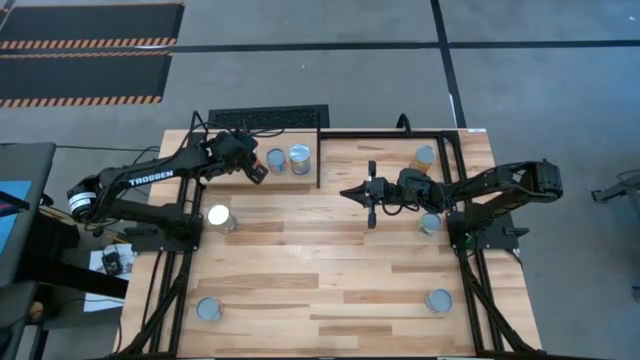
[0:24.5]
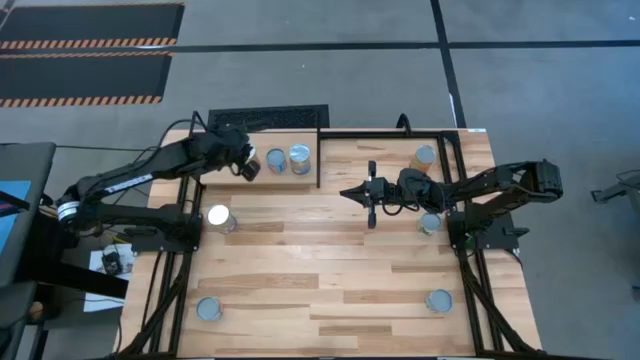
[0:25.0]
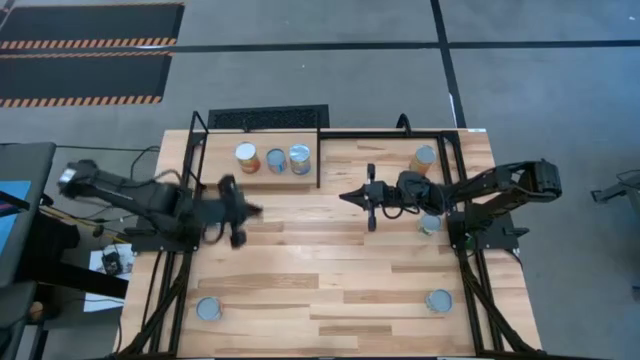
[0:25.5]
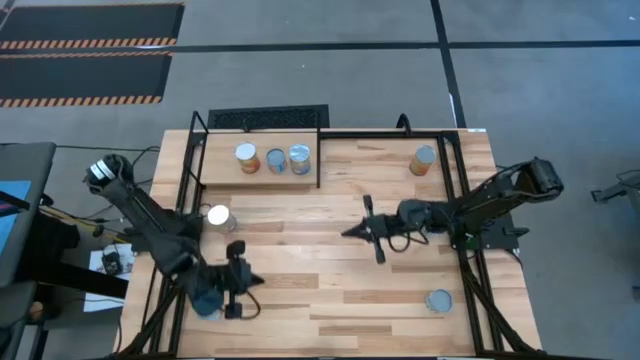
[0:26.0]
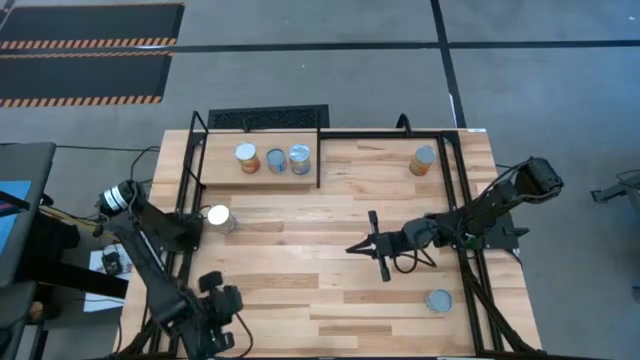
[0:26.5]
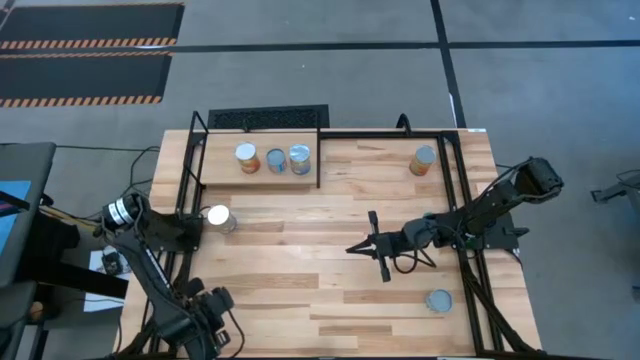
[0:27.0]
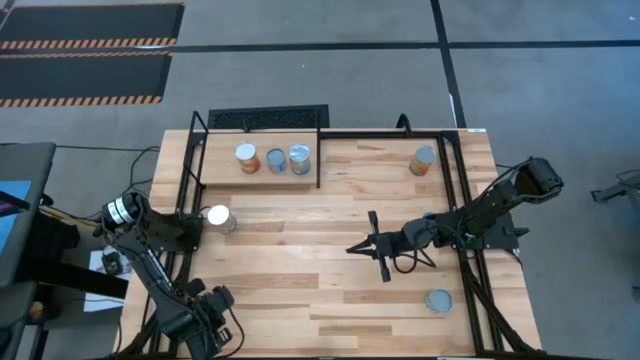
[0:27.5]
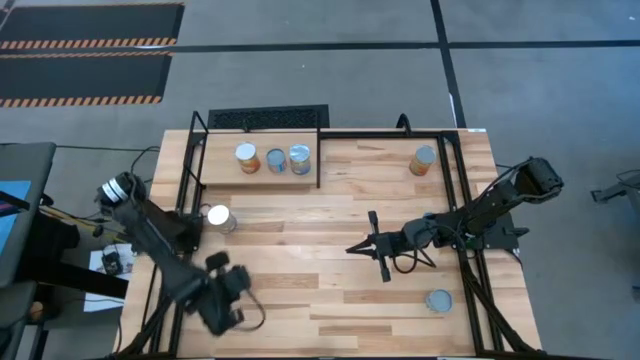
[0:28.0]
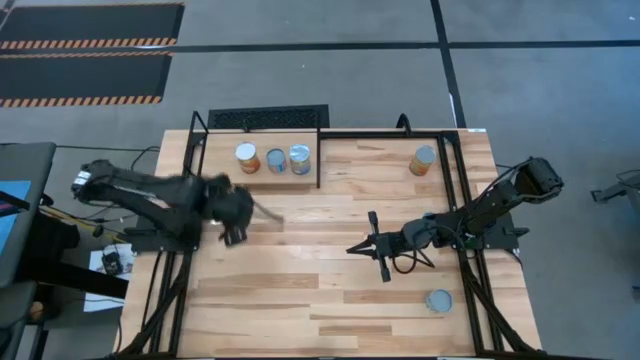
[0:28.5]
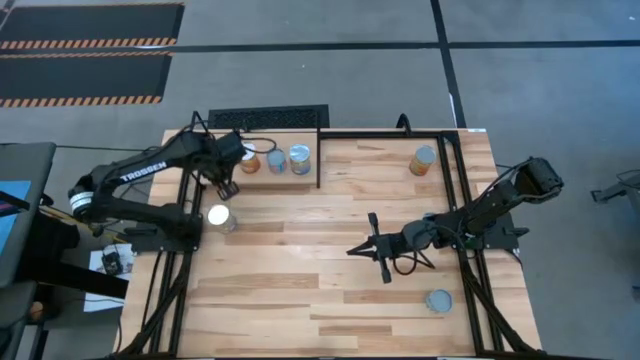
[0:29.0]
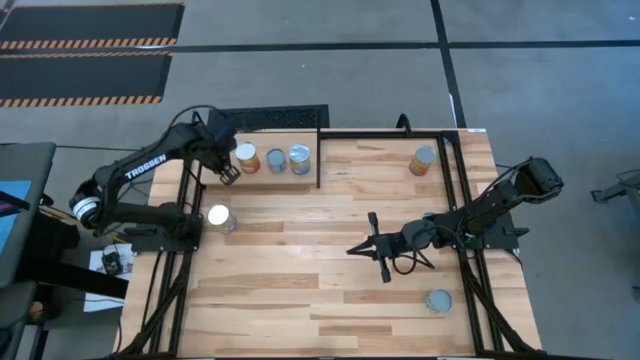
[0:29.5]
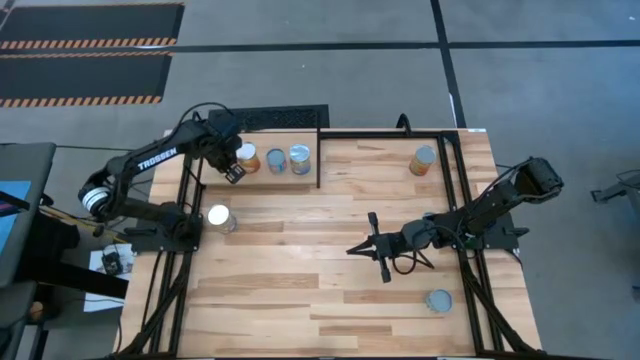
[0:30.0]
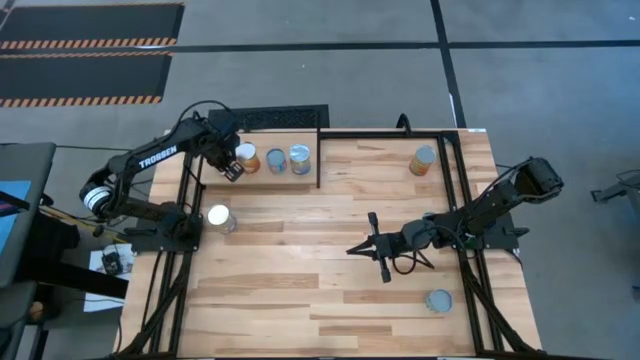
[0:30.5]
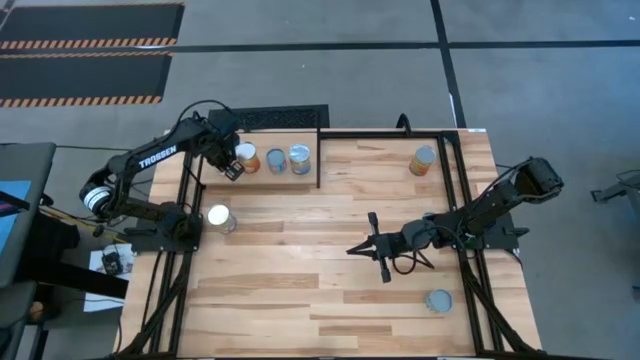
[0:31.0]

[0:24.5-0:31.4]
Task: Pick and place cans onto a shelf
Put the canned oranges on the shelf

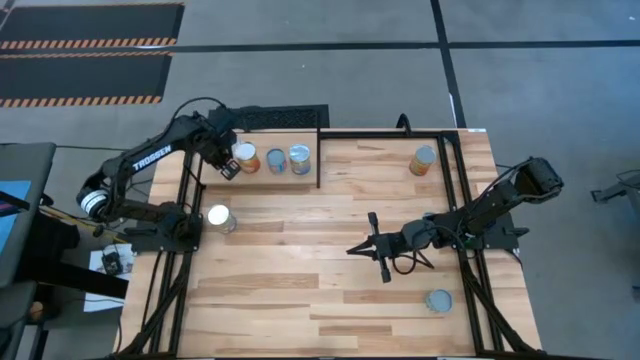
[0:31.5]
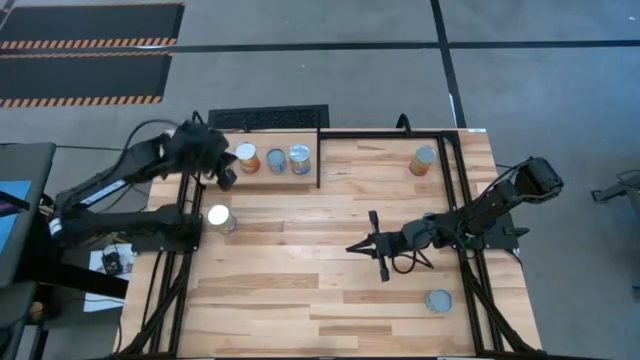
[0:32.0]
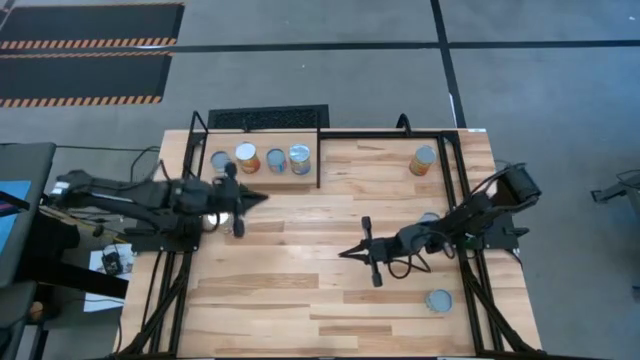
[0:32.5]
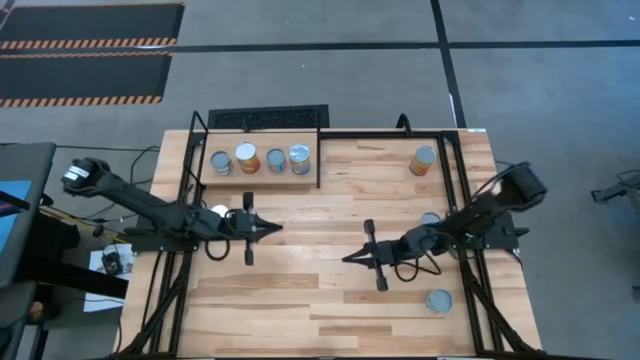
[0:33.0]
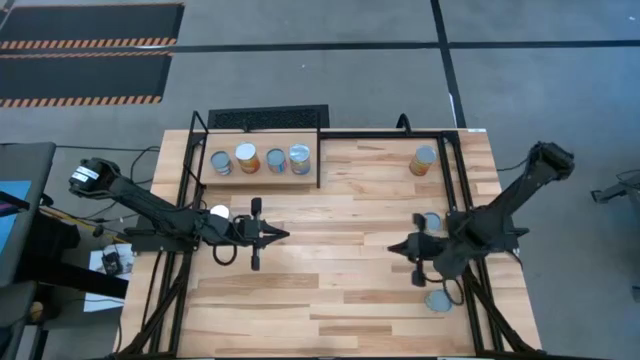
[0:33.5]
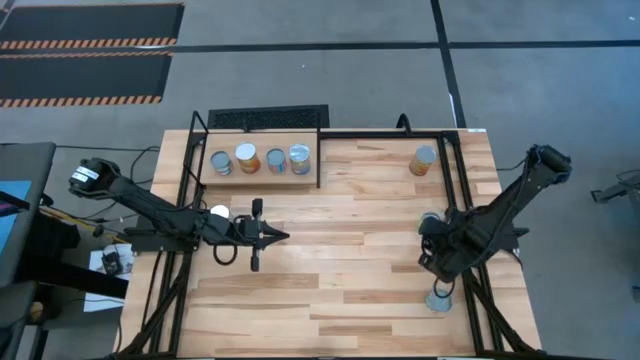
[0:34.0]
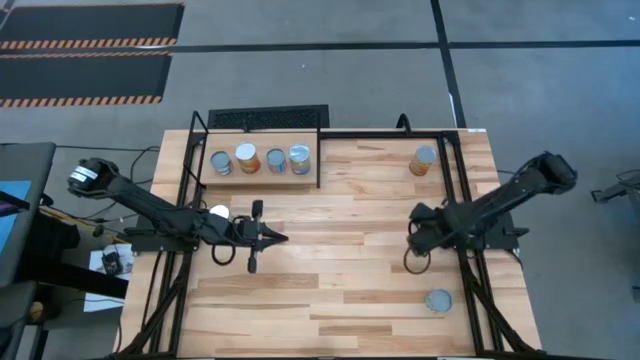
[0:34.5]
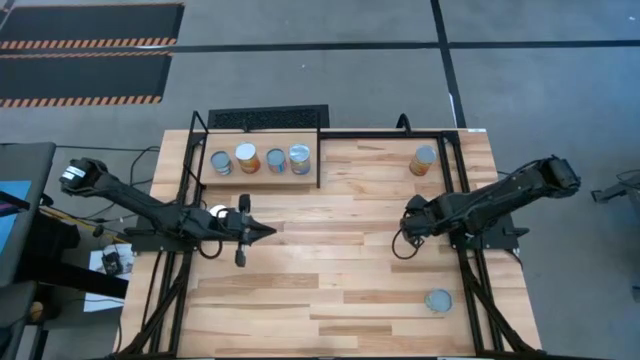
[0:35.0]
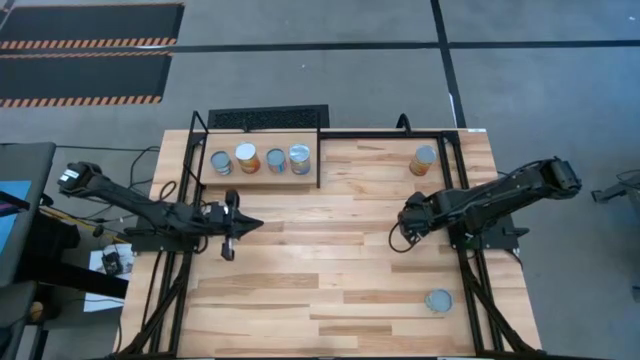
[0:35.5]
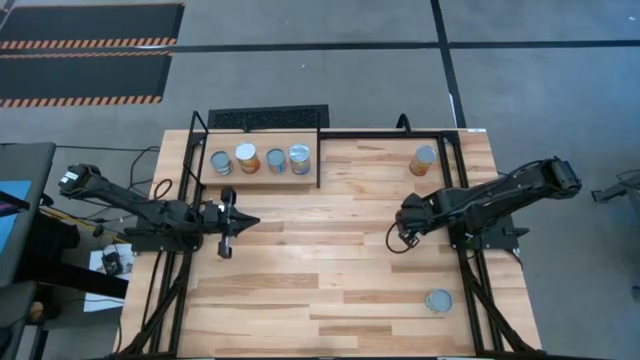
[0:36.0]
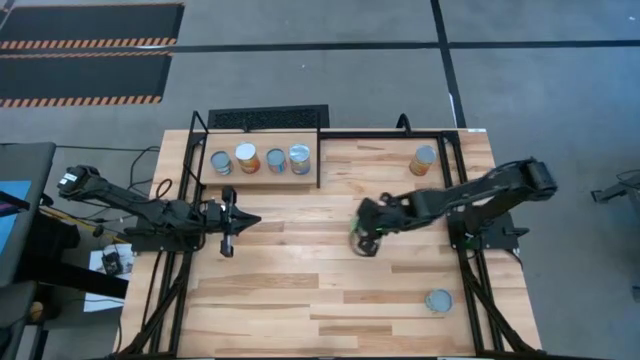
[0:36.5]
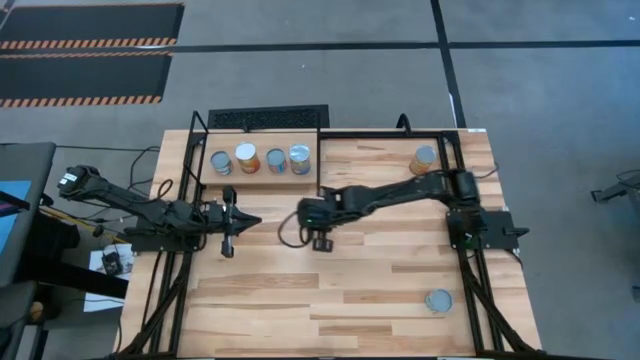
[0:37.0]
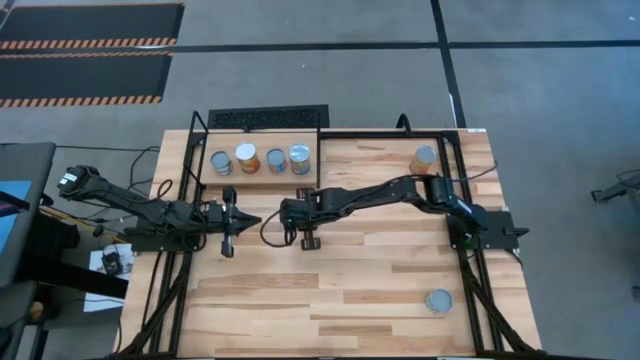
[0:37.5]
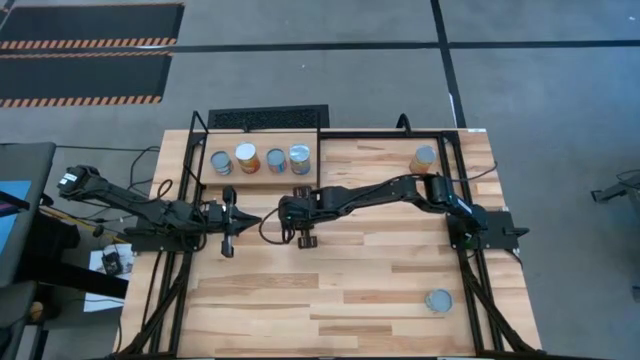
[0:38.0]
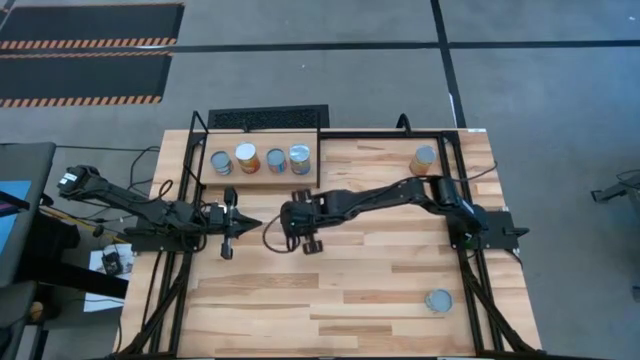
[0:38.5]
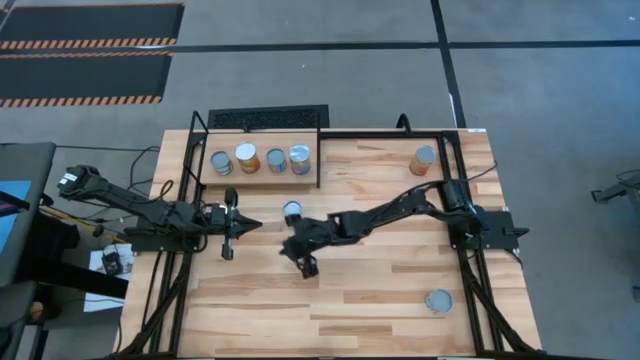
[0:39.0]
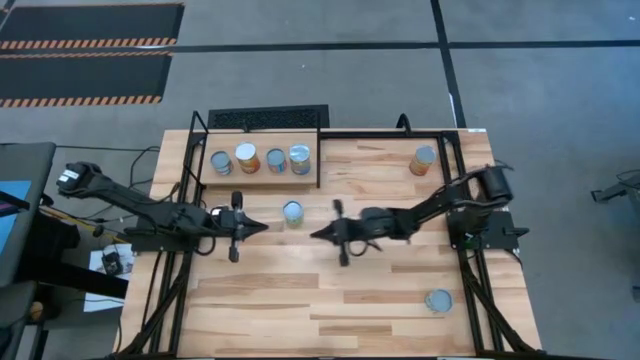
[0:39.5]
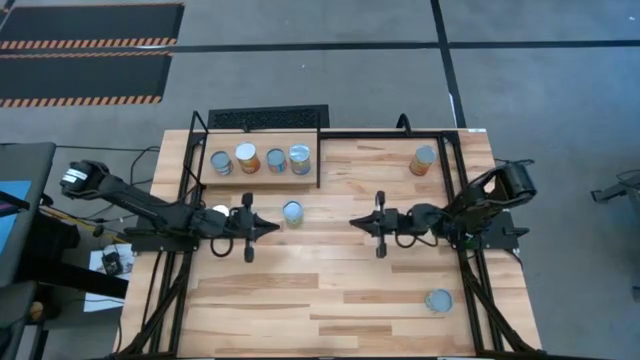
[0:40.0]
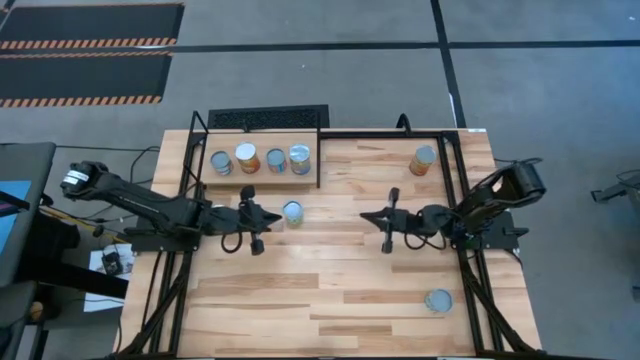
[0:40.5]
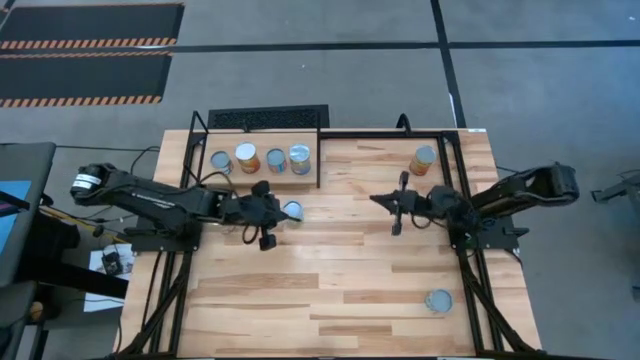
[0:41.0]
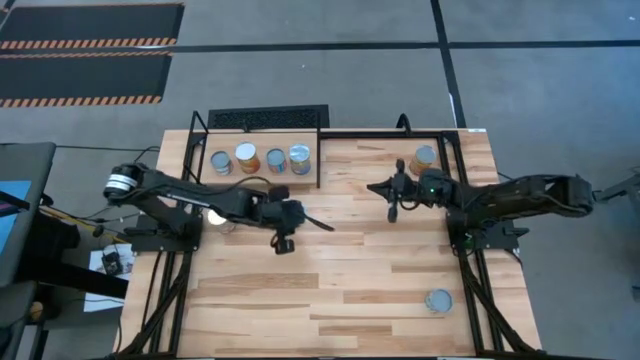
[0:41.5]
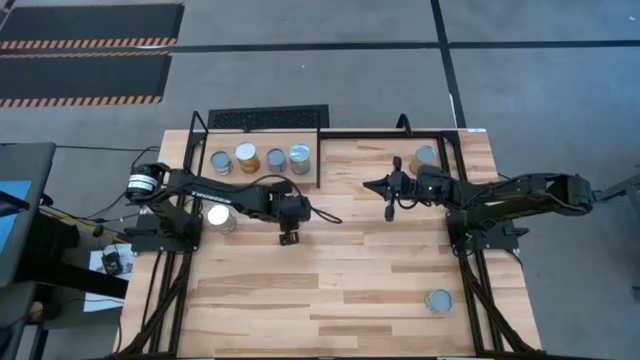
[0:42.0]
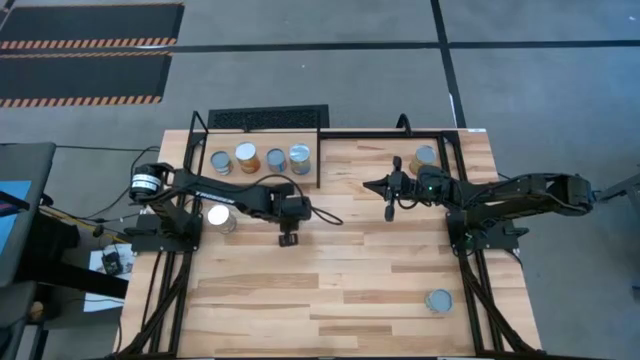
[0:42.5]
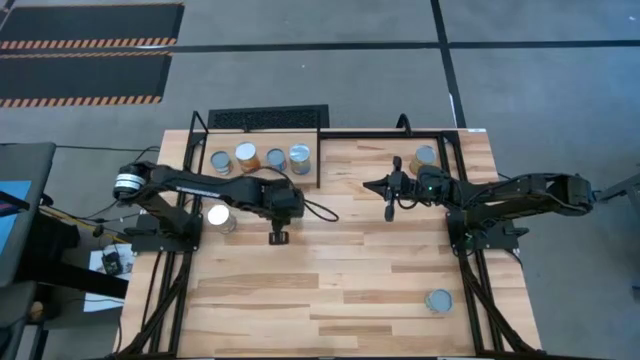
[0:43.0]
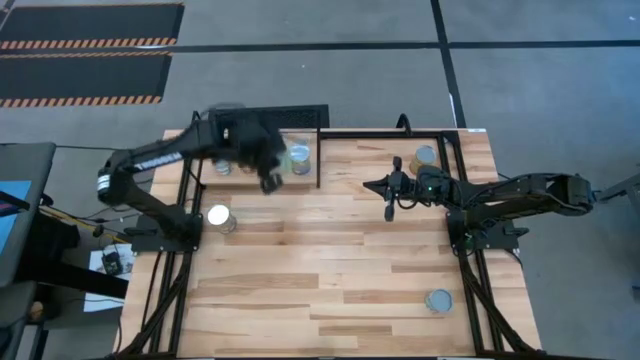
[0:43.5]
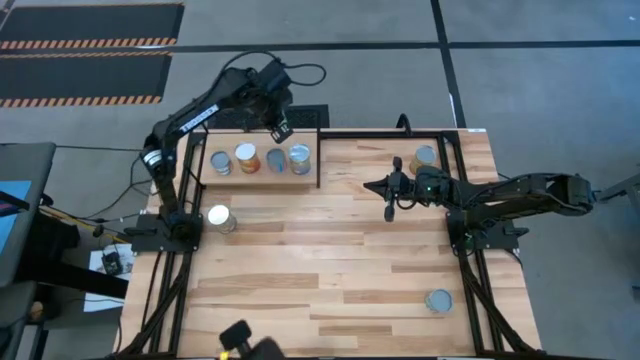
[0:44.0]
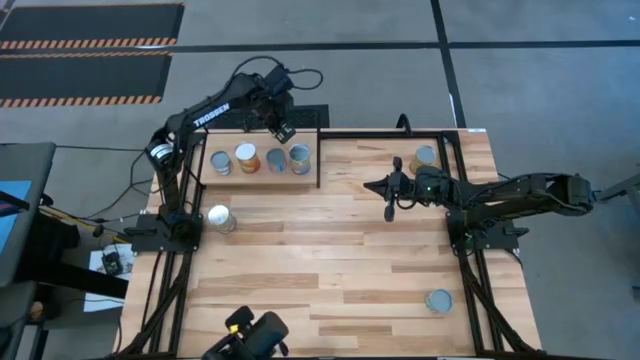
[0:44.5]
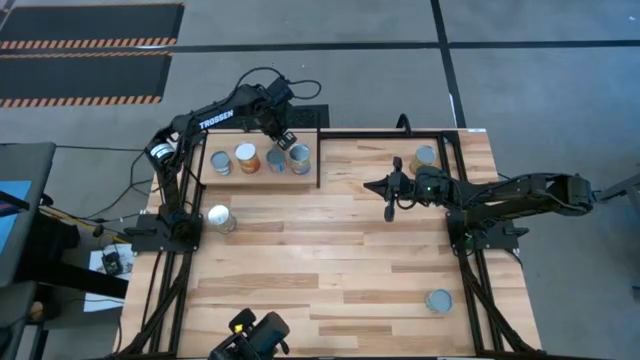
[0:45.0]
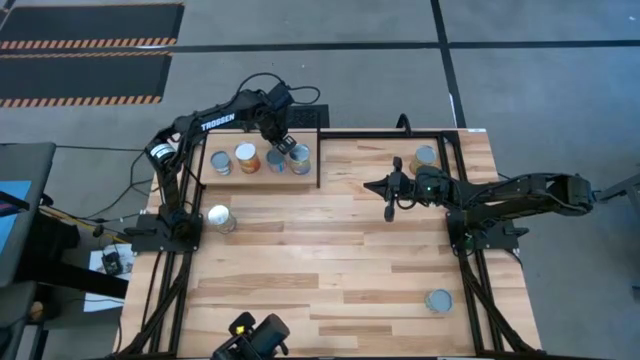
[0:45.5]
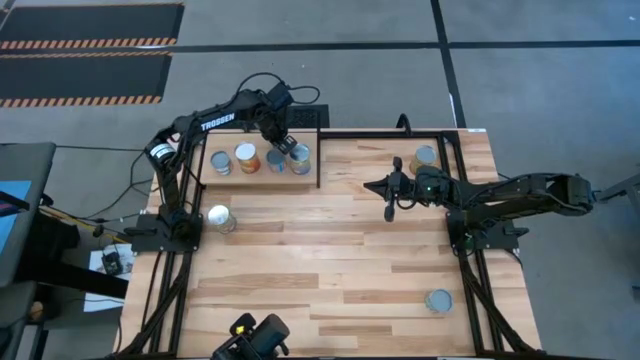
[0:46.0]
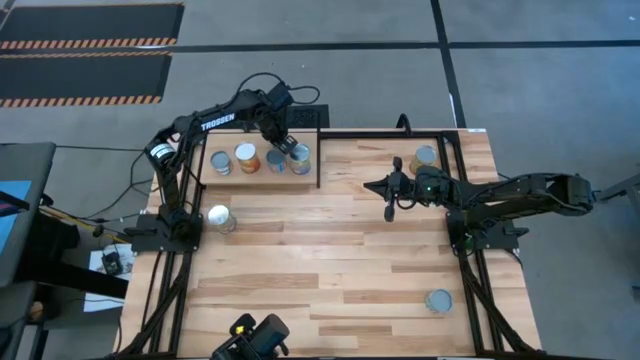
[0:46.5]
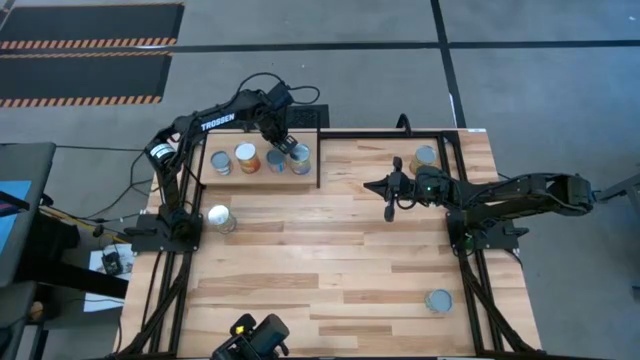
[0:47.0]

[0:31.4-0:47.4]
Put the canned peas on the shelf
